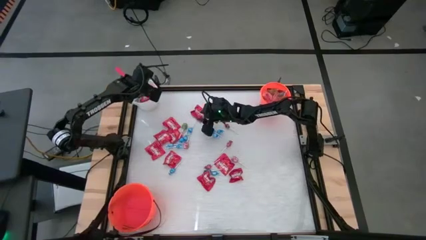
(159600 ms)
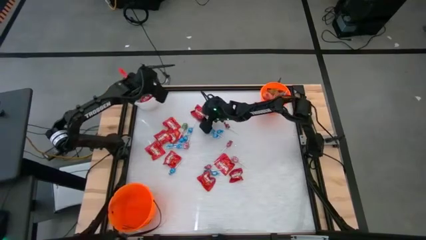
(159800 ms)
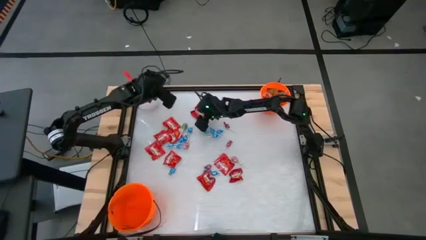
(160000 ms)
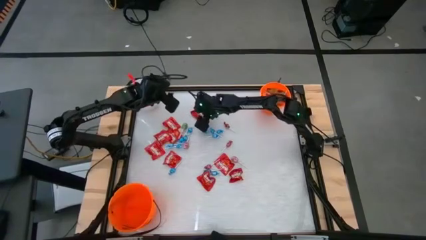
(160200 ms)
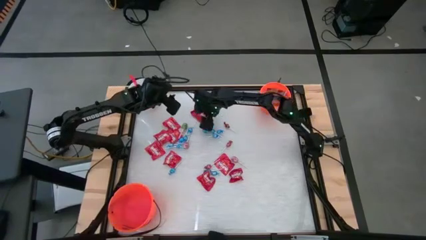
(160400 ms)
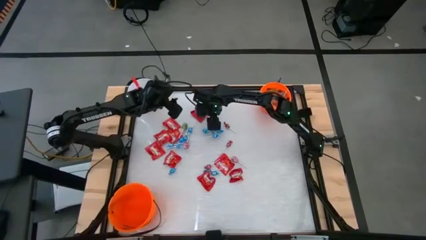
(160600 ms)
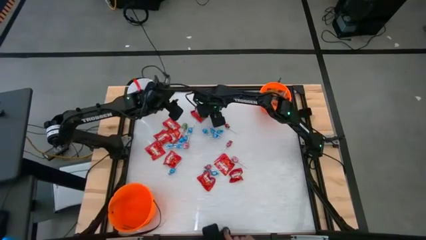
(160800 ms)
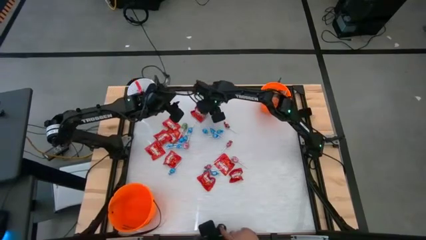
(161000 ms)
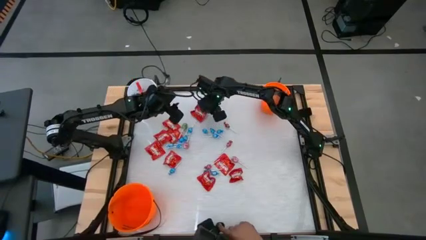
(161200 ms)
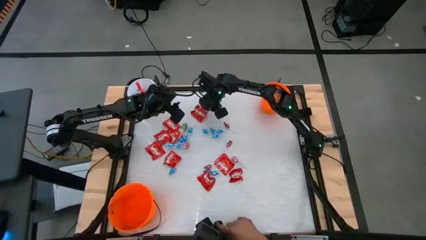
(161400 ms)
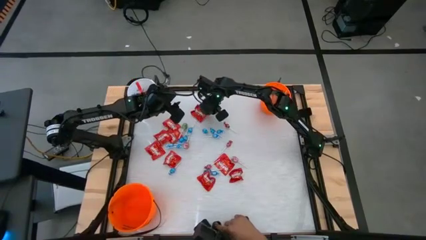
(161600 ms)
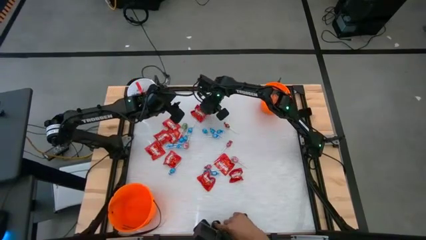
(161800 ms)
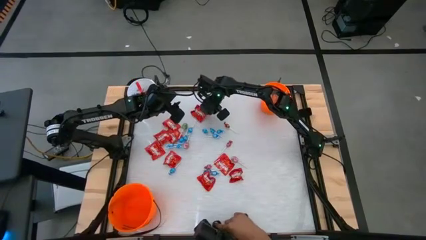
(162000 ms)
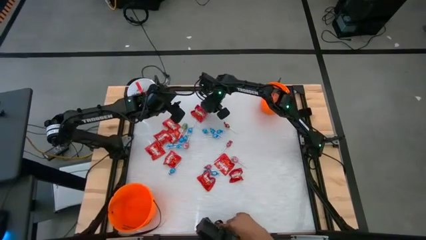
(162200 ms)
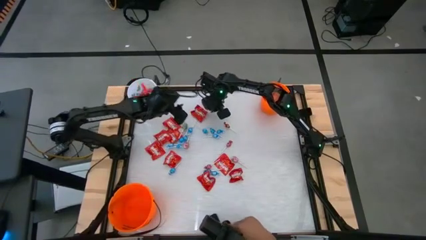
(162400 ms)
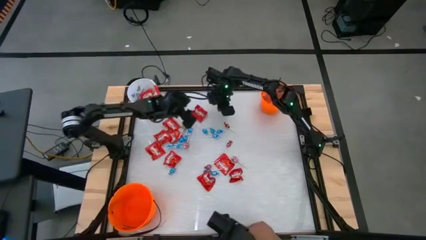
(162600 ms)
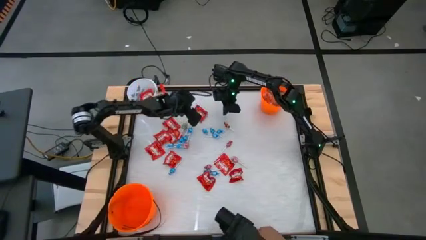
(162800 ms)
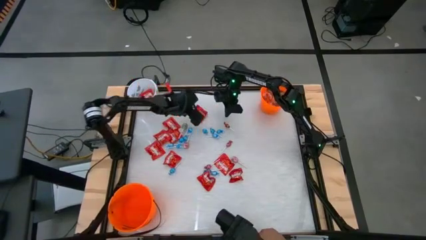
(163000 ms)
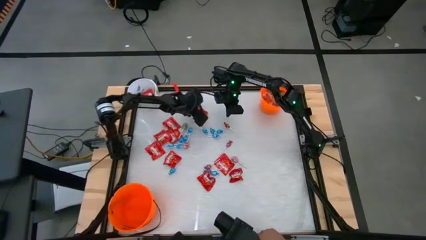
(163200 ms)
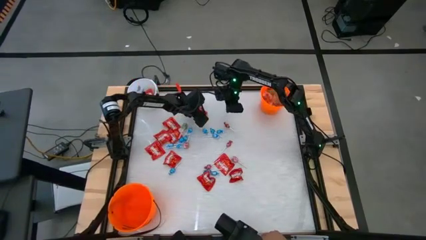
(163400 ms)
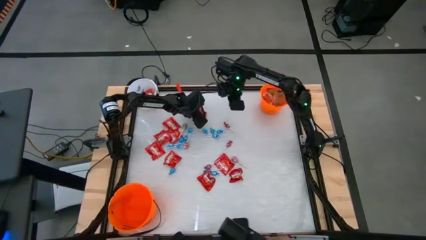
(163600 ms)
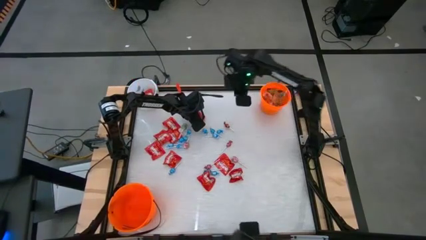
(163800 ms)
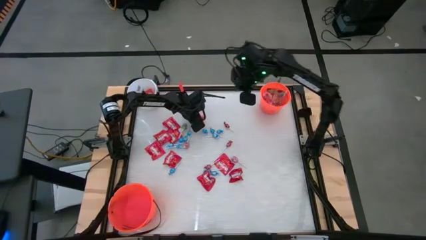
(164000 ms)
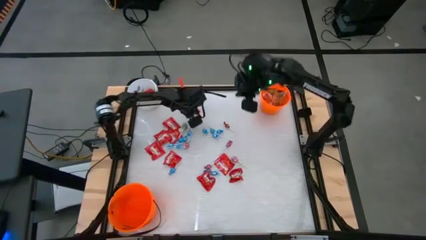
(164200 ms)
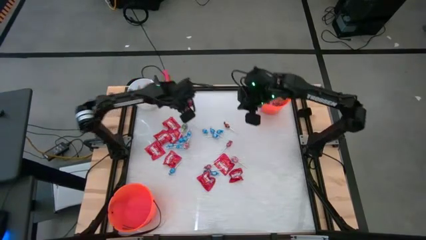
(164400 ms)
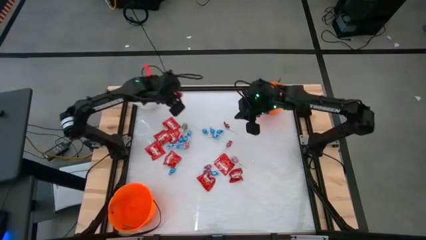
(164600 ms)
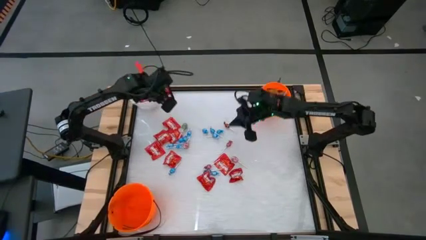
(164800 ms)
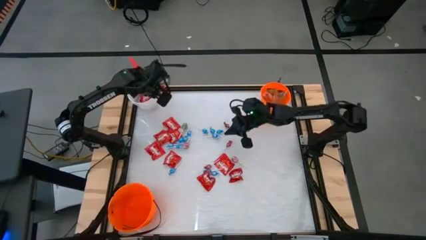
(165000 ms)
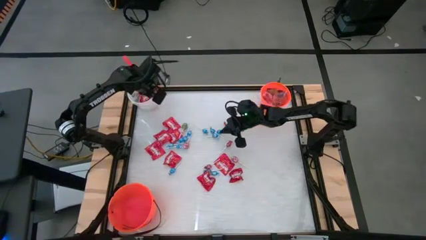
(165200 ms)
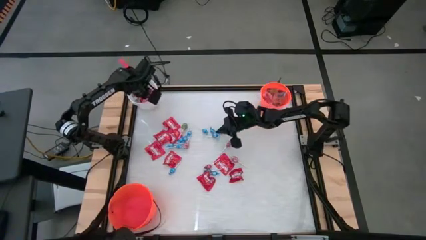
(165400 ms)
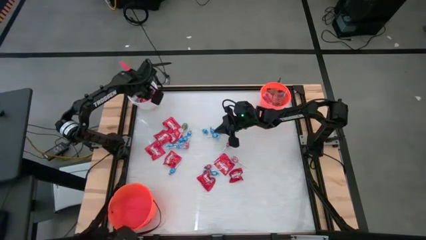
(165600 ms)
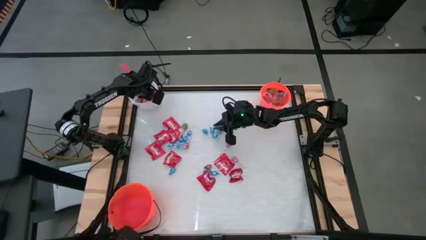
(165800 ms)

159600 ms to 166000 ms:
Task: Sort candy by brand, put in halloween buckets
Put the red candy pack into the white bucket

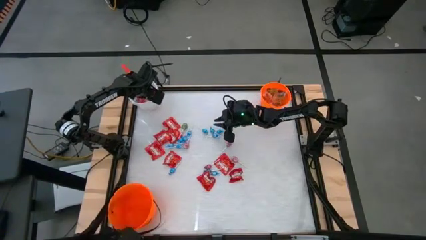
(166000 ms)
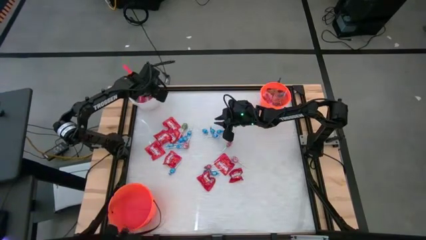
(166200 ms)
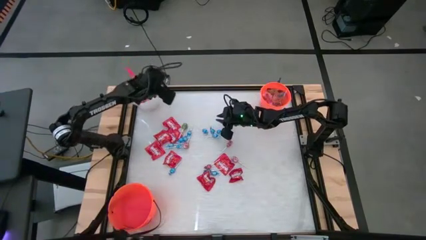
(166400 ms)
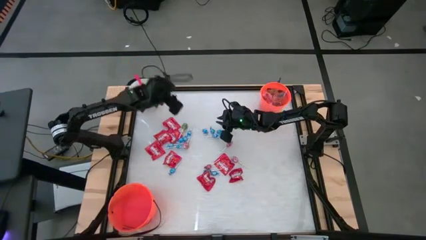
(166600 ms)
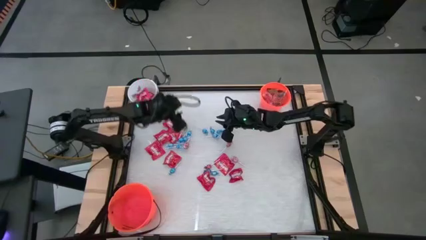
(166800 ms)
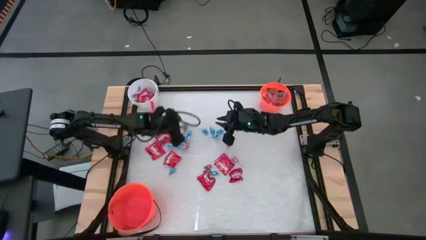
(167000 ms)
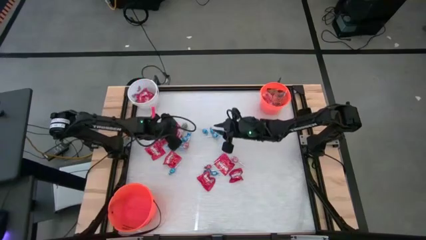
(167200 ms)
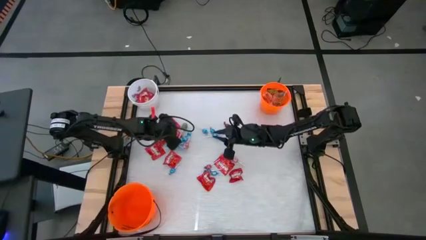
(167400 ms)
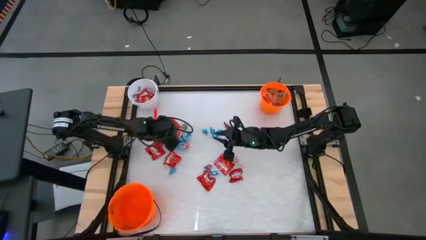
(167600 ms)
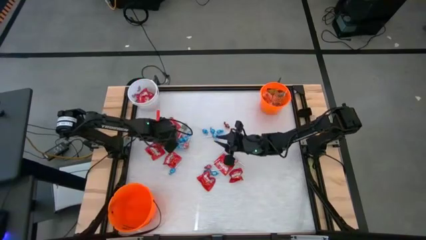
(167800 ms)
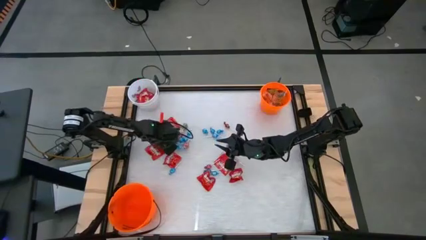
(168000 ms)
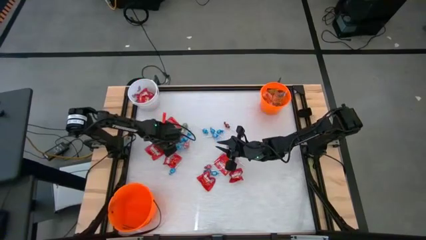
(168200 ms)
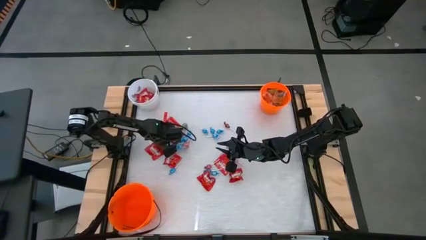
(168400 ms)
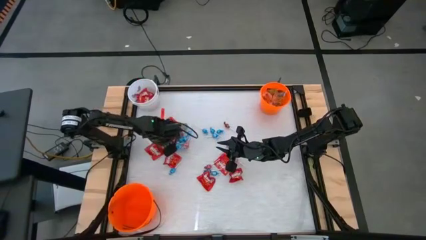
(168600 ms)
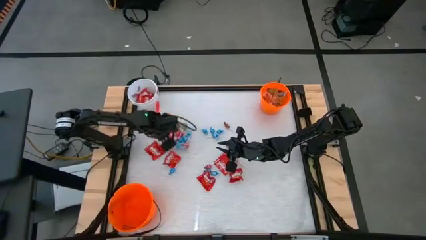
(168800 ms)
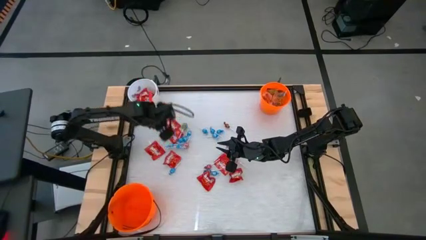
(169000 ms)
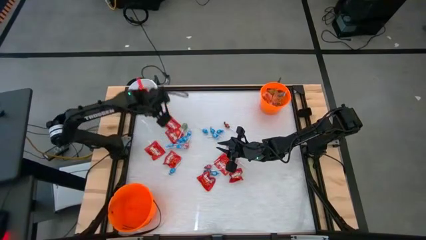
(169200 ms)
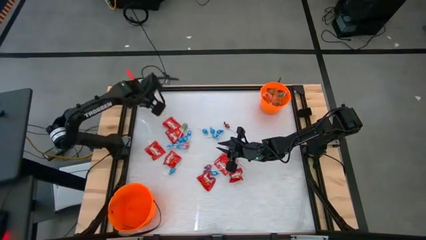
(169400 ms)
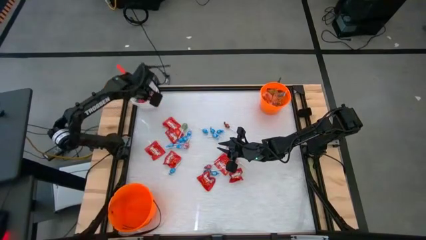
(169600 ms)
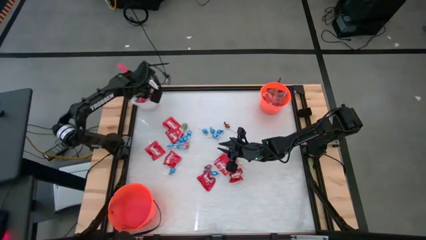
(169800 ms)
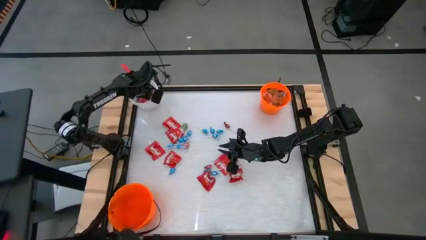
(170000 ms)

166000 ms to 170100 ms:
Put the red candy pack into the white bucket

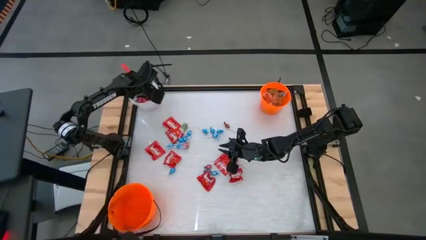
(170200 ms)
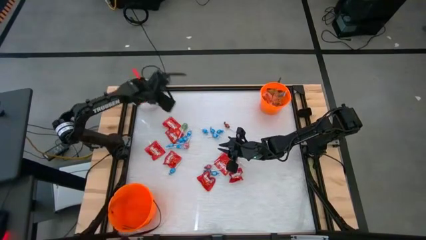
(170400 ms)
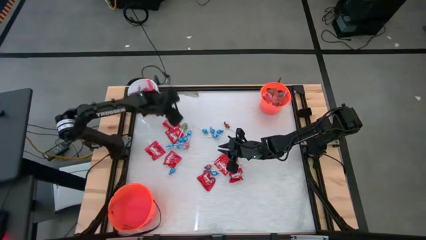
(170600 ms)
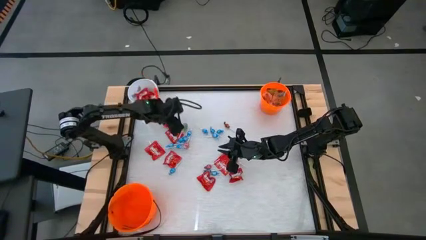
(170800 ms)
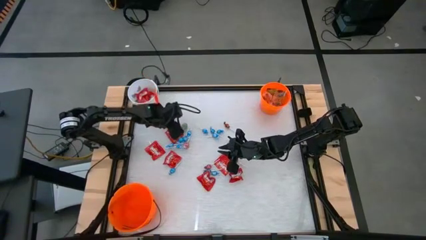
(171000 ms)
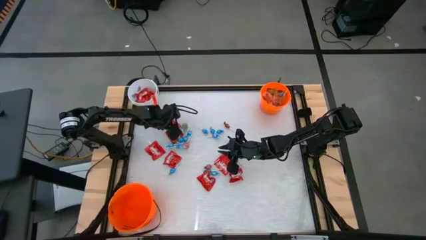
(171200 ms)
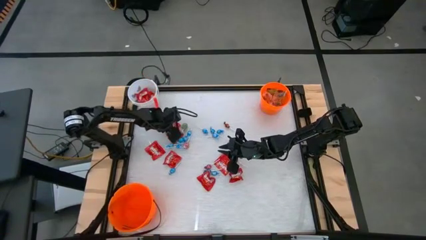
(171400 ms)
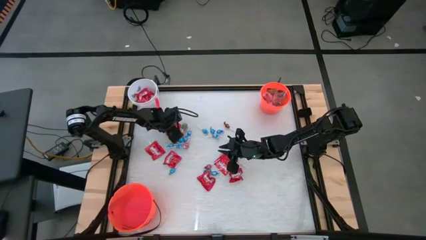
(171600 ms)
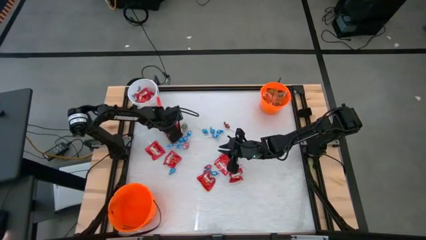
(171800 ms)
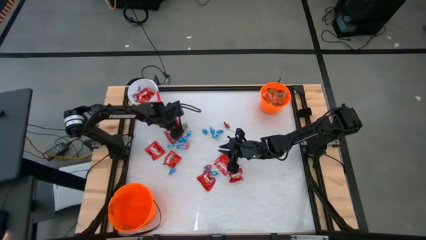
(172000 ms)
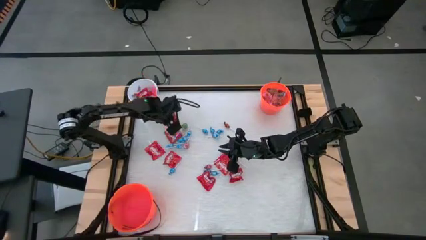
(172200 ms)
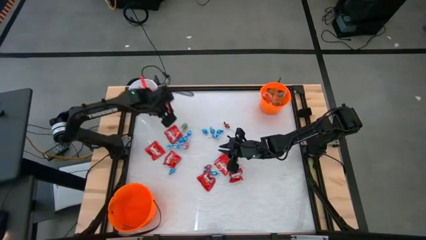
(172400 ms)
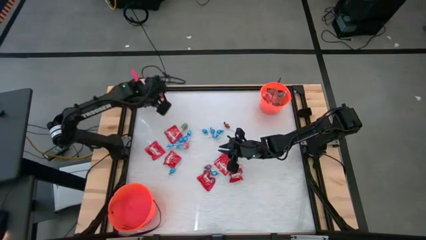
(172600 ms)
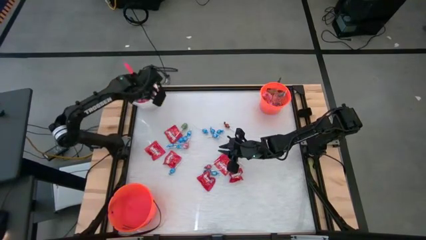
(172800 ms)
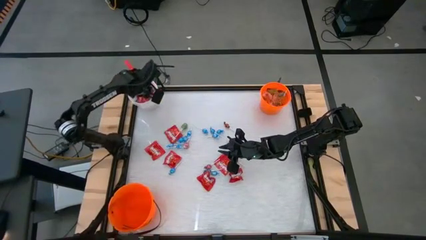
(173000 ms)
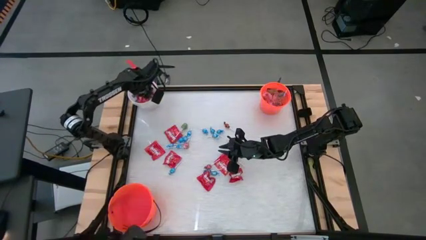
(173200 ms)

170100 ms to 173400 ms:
Put the red candy pack into the white bucket

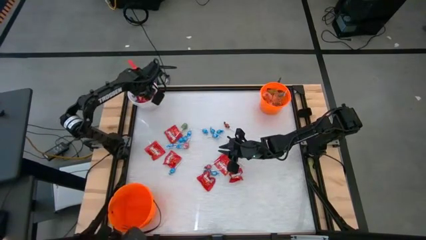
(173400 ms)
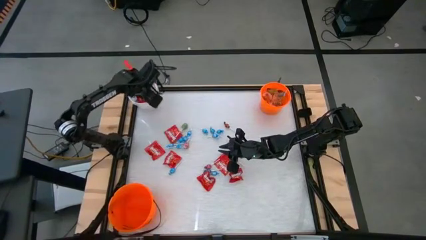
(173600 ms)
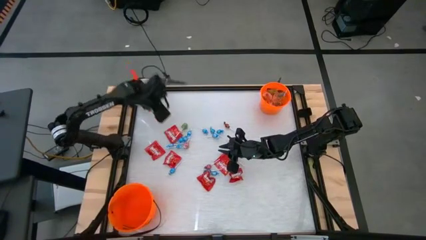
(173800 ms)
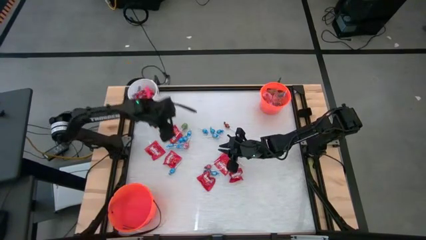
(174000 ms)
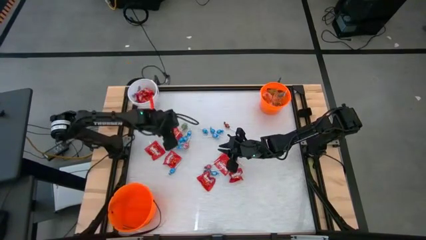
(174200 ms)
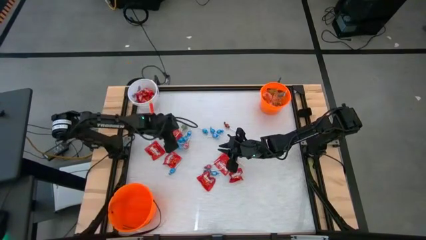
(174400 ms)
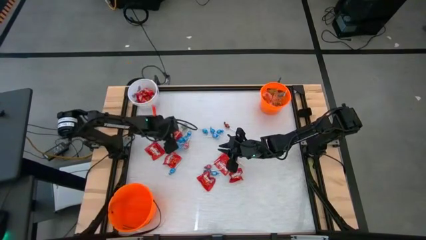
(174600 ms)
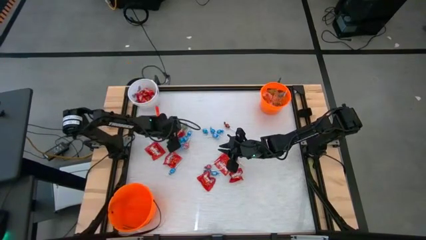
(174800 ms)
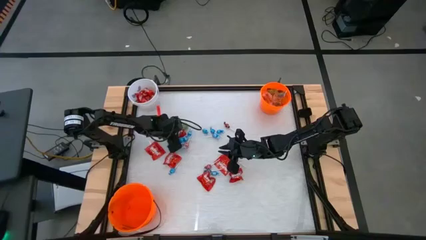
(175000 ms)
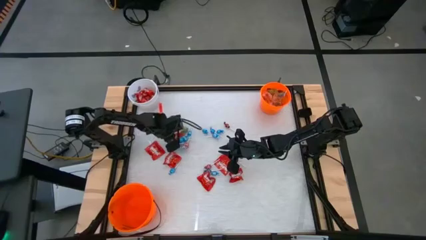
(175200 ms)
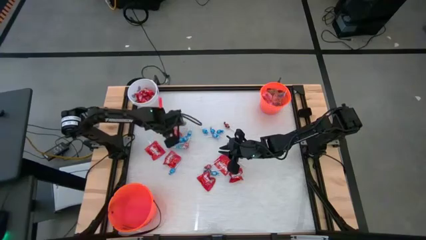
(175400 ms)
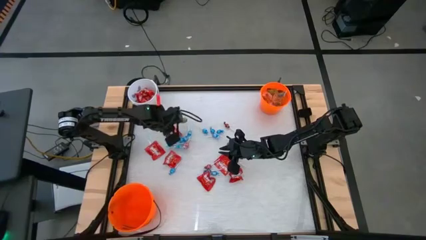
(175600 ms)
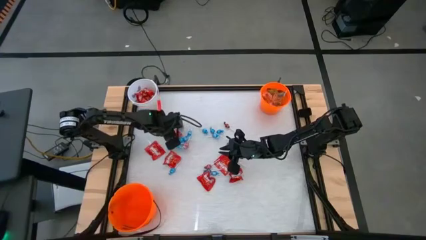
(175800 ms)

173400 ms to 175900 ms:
Put the red candy pack into the white bucket

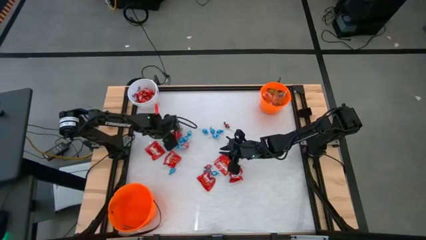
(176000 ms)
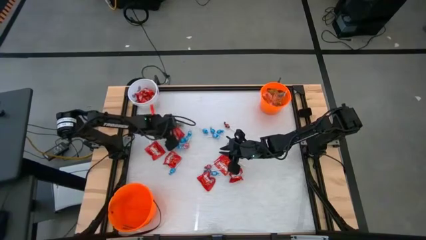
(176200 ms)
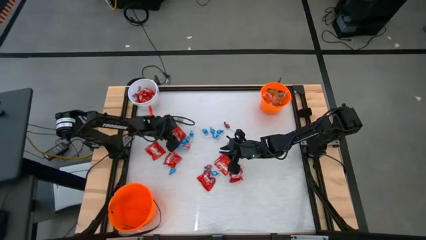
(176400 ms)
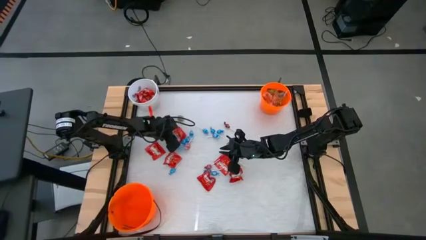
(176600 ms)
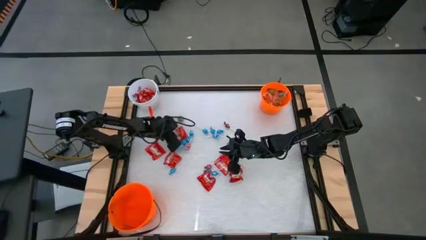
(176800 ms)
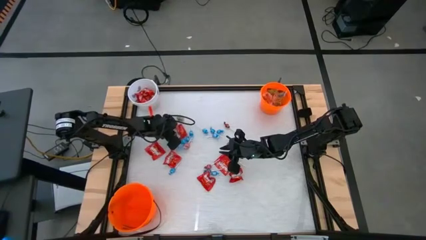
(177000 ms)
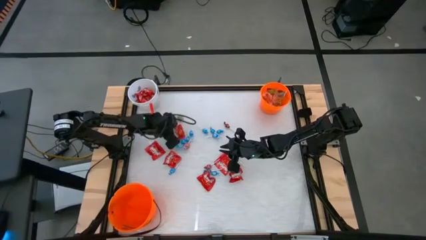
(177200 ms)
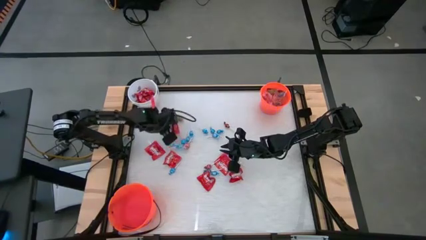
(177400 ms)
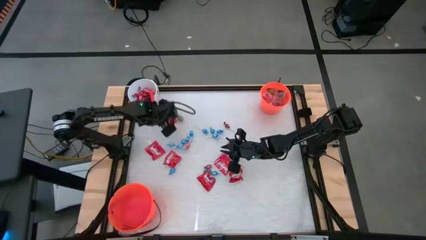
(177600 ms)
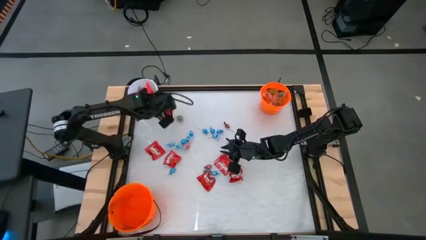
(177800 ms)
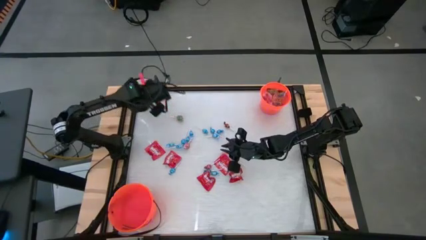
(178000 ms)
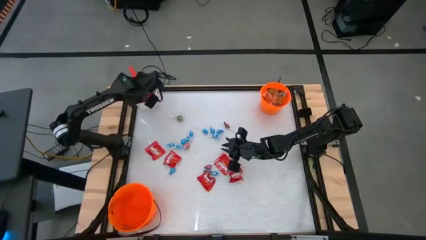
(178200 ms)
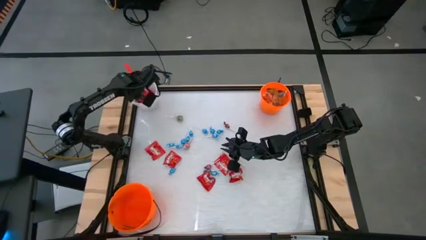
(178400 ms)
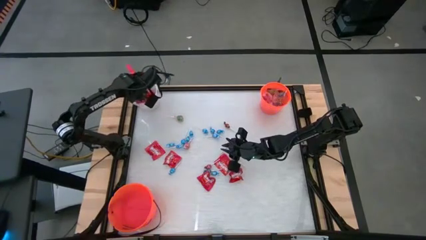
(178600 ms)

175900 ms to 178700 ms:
Put the red candy pack into the white bucket
